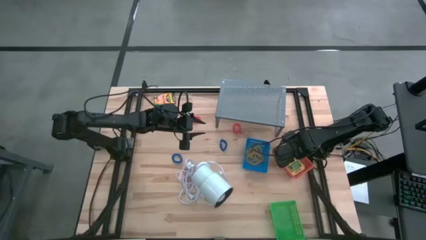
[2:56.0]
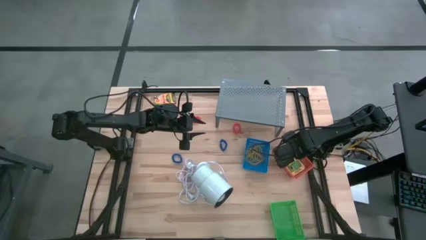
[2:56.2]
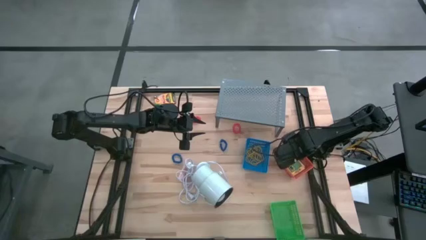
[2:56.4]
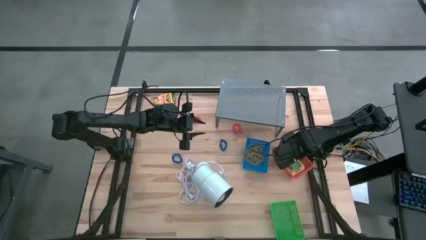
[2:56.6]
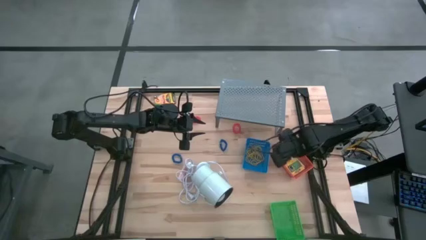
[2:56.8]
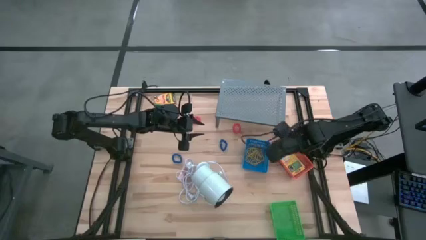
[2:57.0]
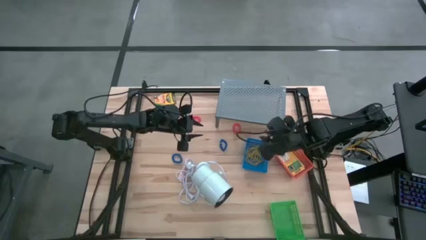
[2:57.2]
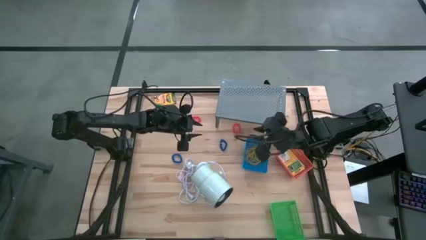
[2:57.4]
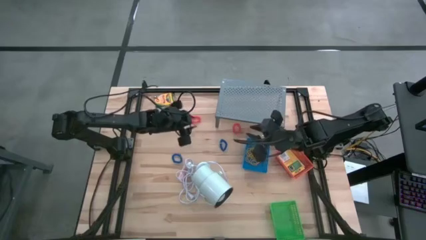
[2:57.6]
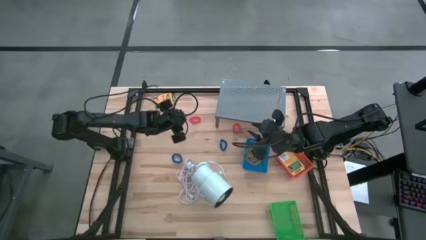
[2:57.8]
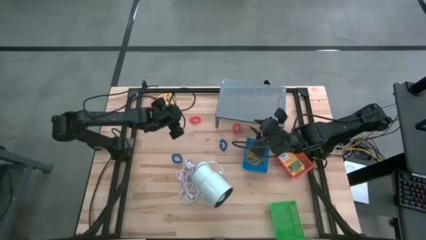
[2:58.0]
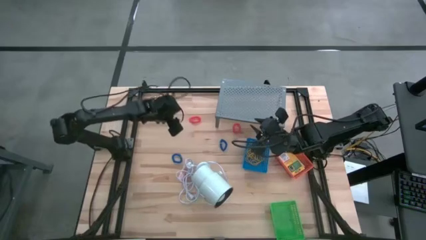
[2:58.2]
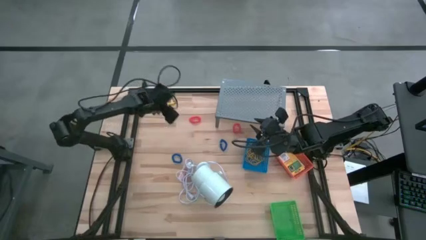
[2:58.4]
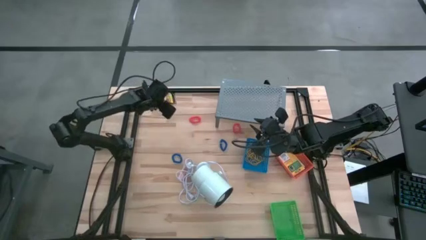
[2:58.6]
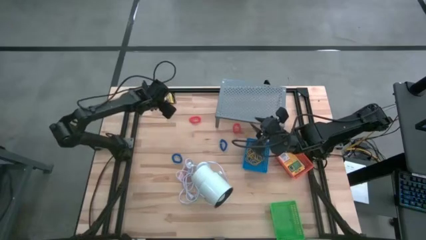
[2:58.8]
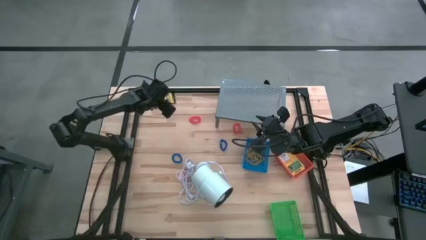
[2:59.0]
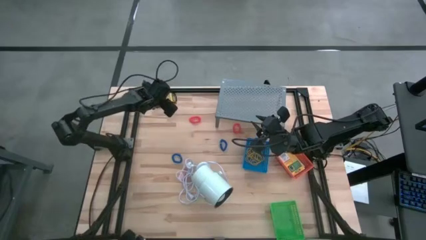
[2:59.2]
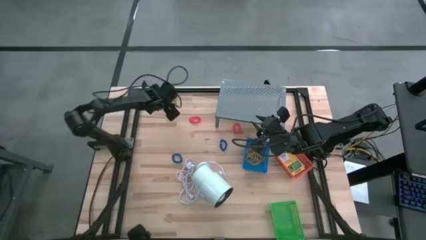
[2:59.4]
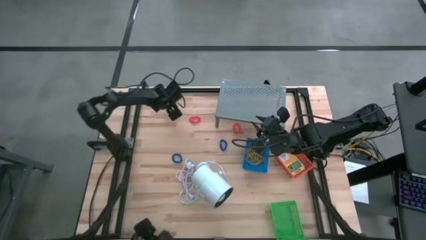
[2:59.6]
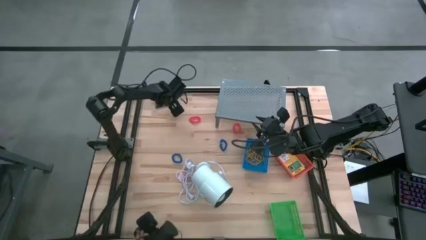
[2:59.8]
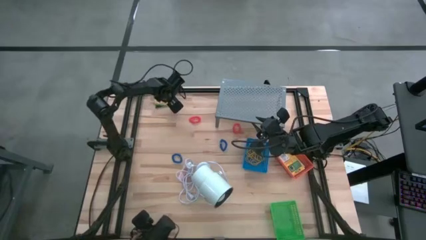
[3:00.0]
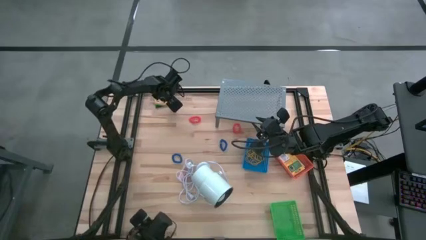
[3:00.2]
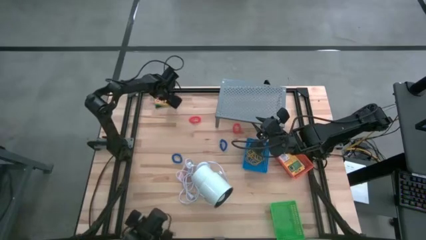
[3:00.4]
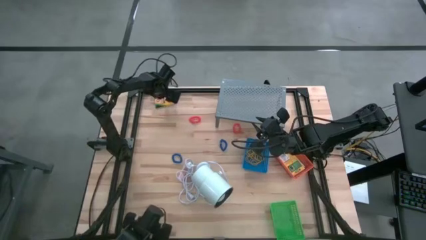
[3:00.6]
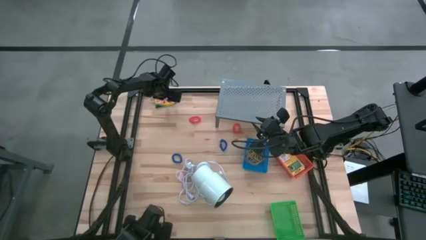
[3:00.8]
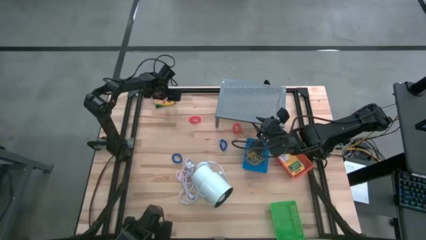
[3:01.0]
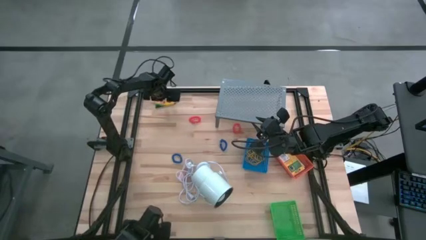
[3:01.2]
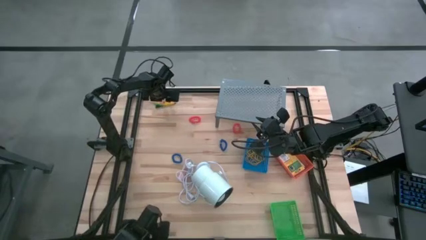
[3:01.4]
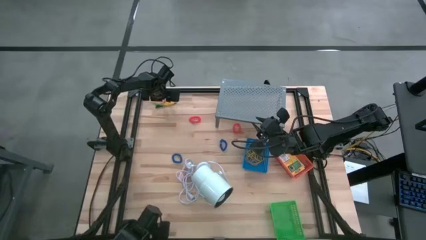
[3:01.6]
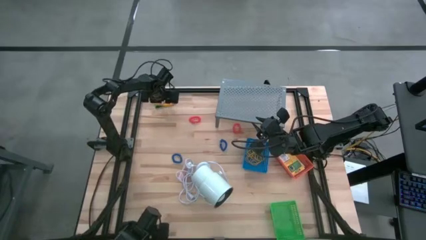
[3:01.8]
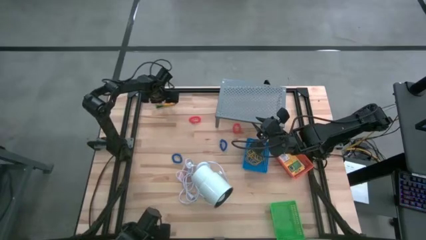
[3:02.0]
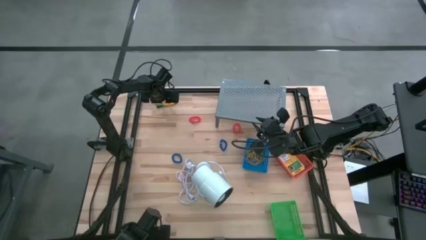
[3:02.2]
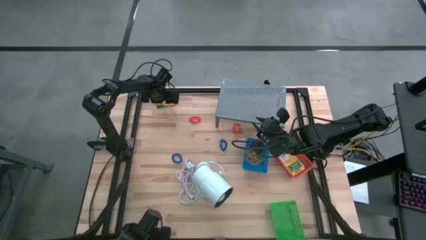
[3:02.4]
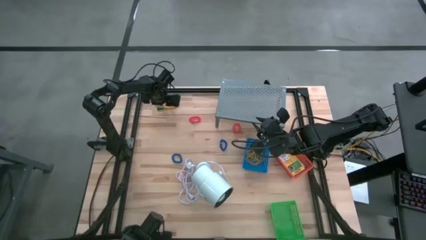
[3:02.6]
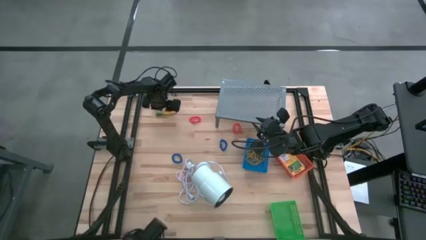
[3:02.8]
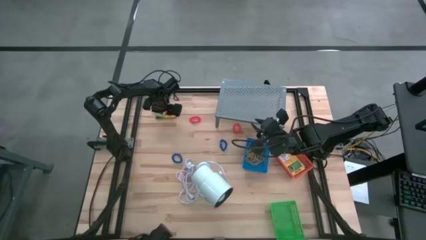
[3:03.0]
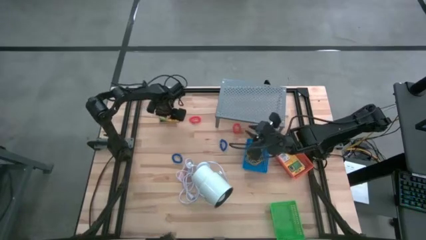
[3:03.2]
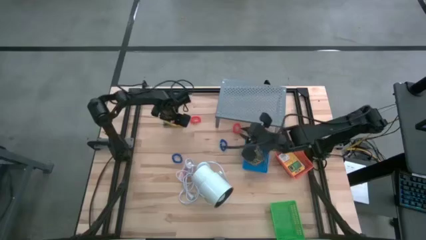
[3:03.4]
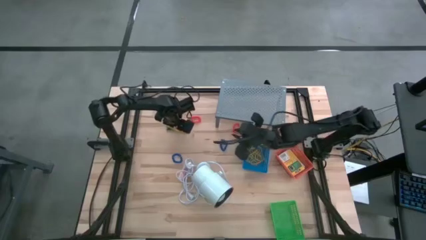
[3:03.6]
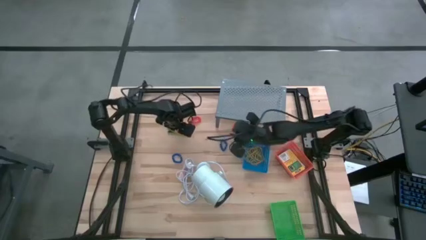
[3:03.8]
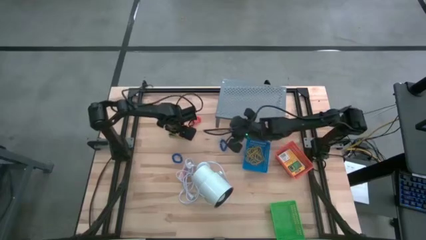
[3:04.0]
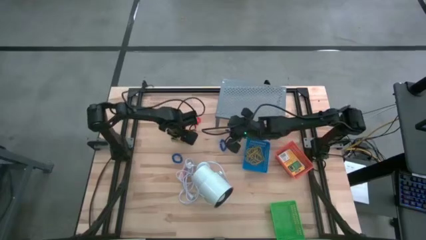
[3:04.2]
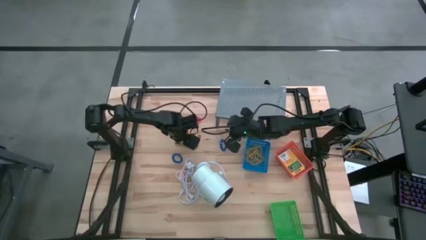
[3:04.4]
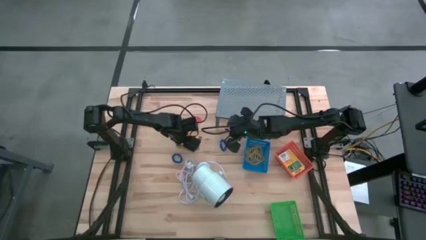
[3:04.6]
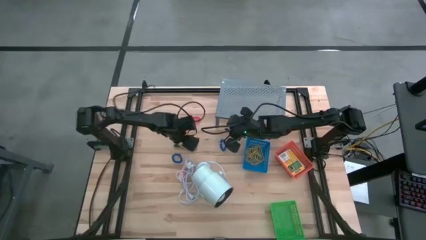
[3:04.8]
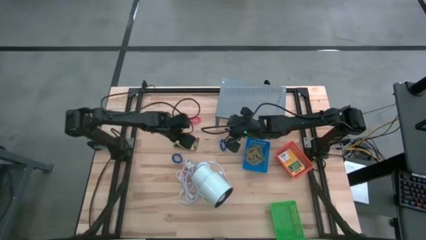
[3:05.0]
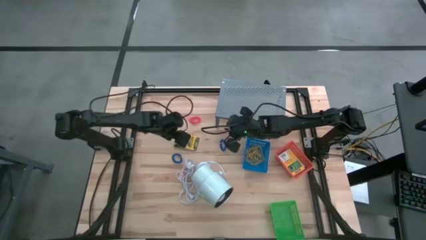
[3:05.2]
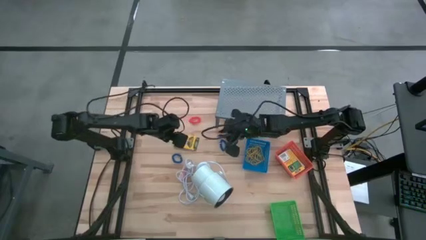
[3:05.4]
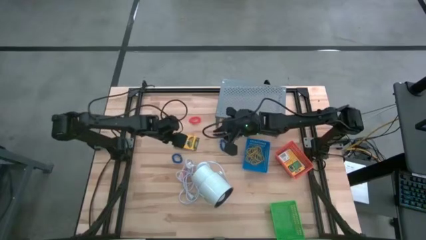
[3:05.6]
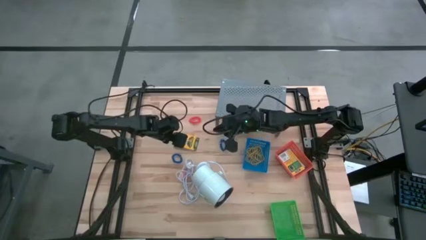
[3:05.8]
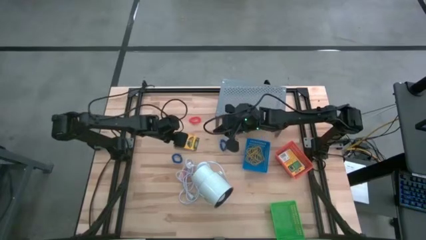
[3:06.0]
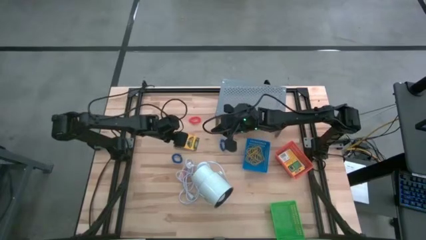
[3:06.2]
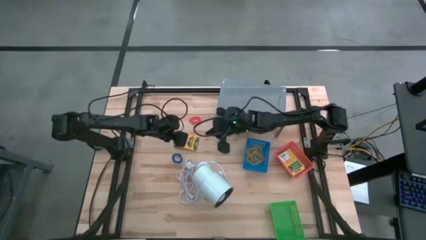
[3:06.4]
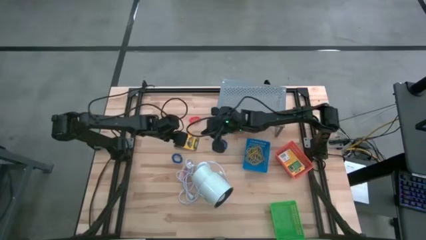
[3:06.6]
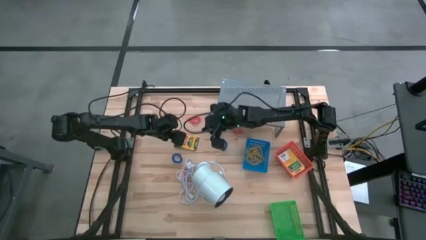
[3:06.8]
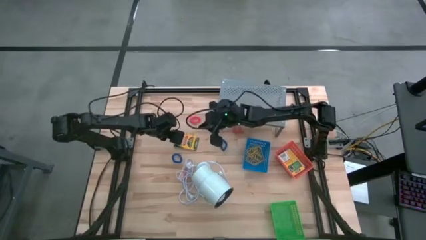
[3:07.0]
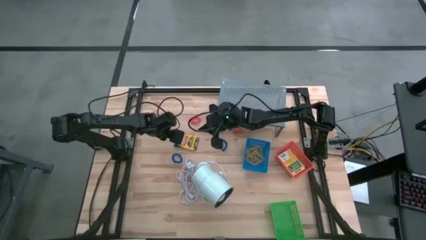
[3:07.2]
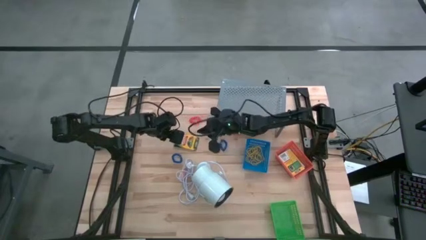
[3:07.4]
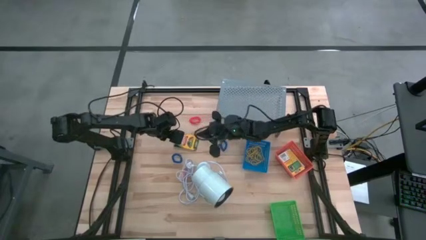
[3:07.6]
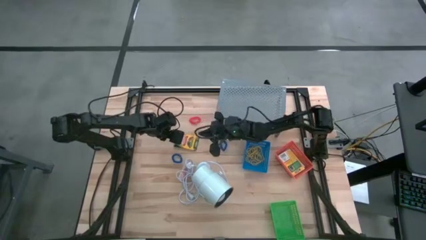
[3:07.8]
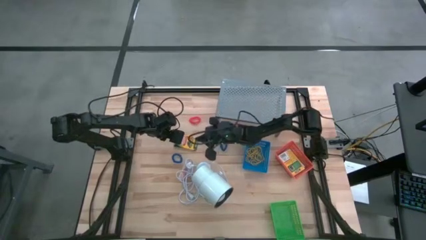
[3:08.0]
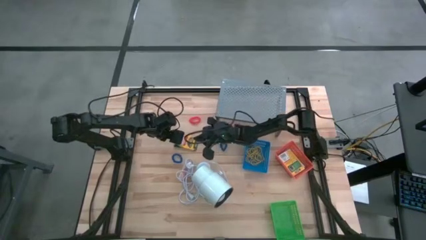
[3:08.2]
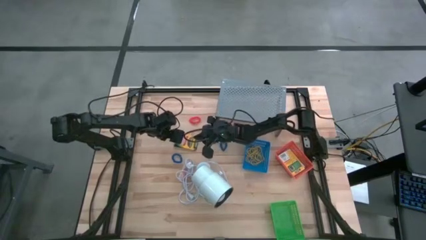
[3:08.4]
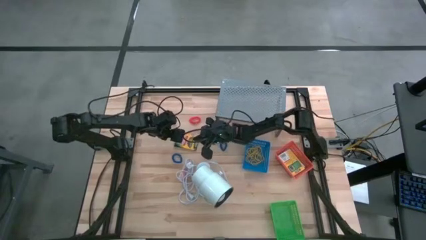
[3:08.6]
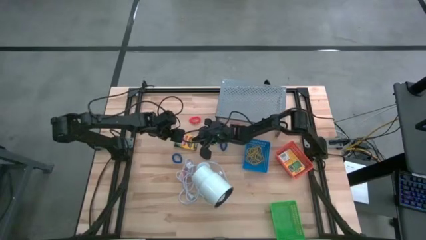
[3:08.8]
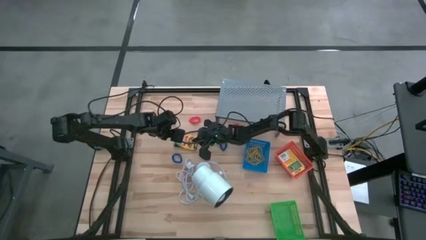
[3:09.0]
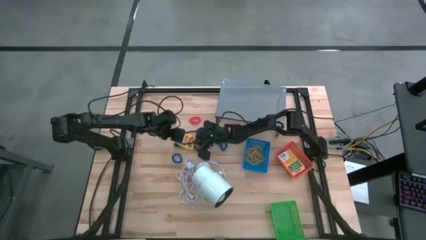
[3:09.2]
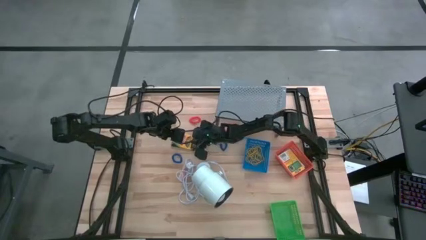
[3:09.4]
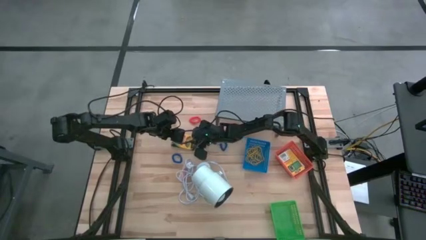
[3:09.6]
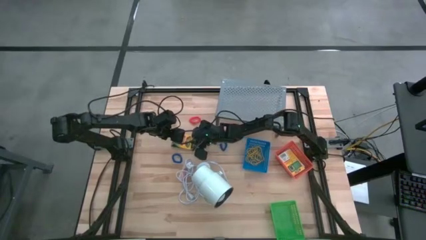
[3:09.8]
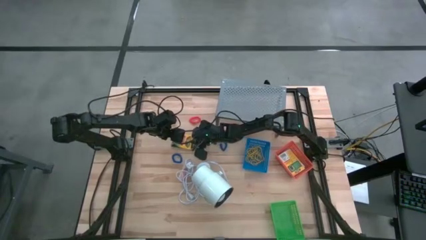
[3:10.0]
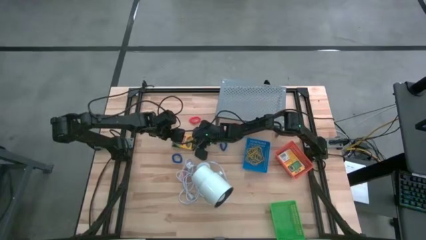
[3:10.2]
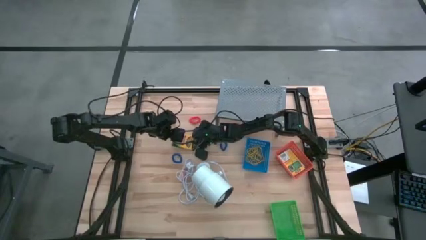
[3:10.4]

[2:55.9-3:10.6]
Task: Pick & Place Office Desk Supplies
Put the yellow box of crayons into the orange bin

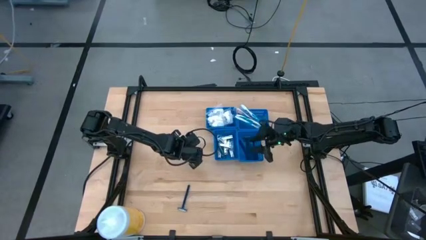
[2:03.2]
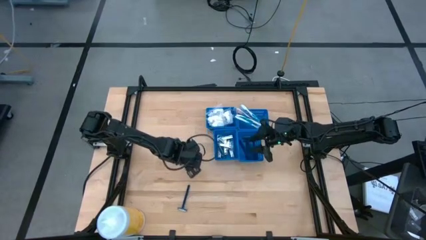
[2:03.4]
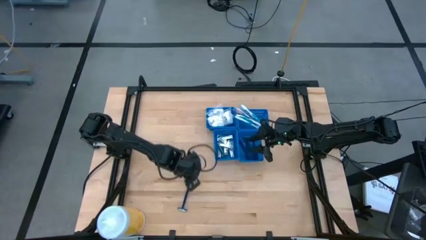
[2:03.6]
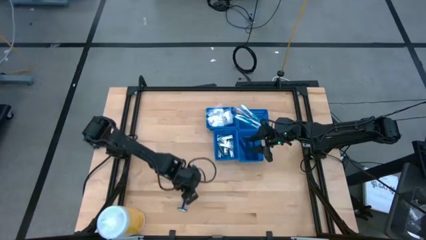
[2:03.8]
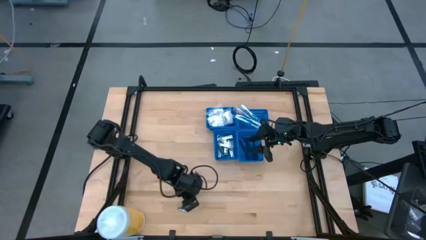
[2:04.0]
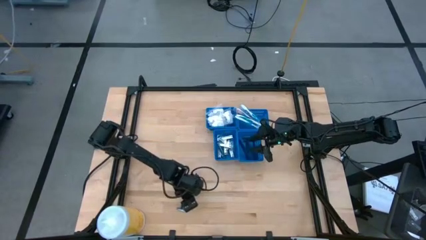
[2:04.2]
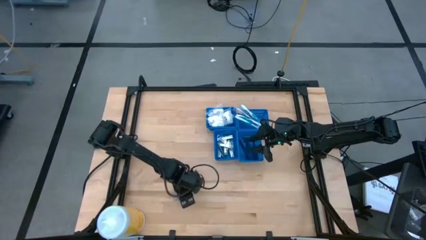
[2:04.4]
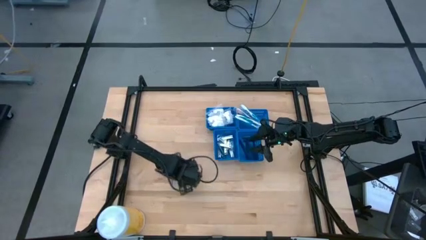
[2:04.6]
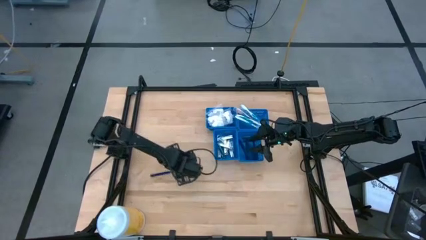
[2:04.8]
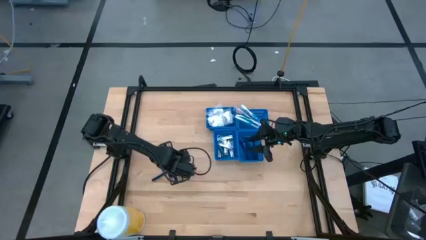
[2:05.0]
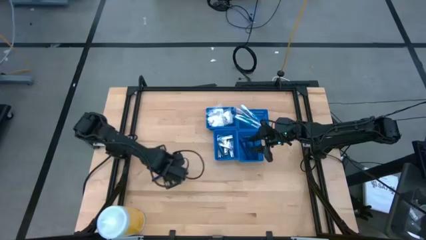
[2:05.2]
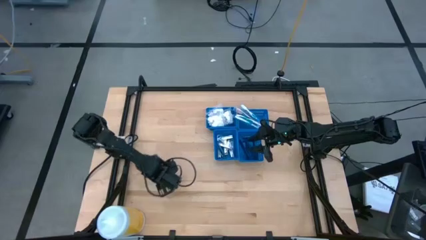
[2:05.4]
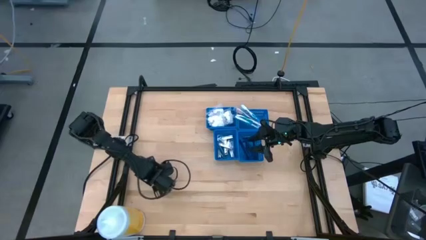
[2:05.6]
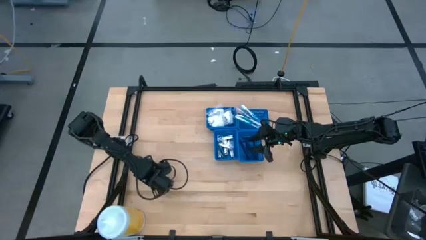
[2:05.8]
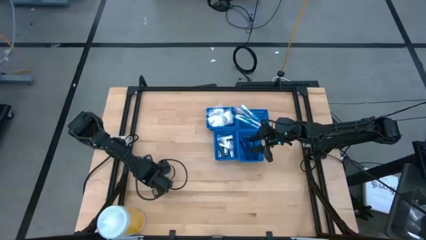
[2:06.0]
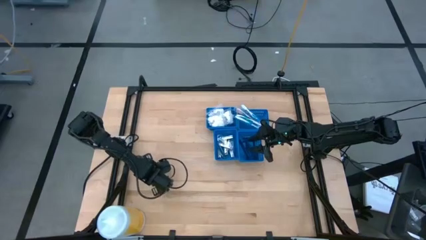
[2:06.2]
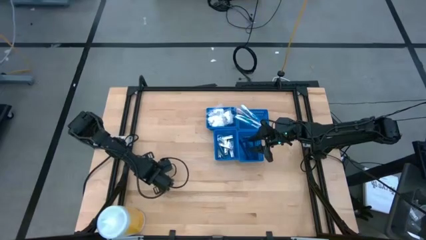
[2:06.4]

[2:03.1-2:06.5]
Task: Pick & Place Travel size toiletries
Put the blue razor into the bottom right blue basket
